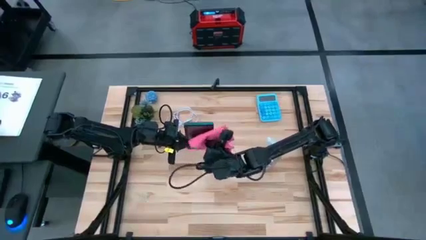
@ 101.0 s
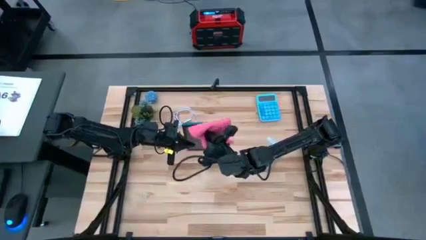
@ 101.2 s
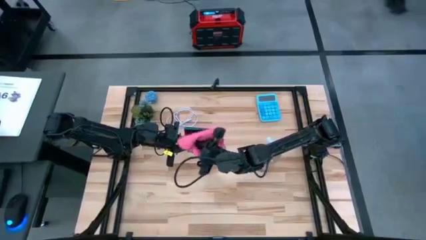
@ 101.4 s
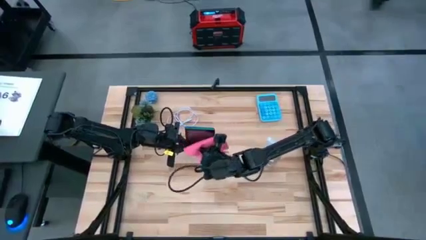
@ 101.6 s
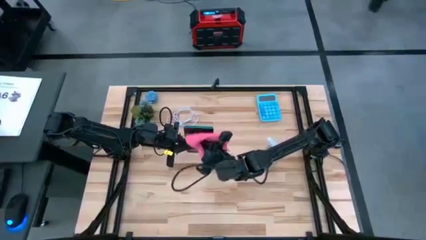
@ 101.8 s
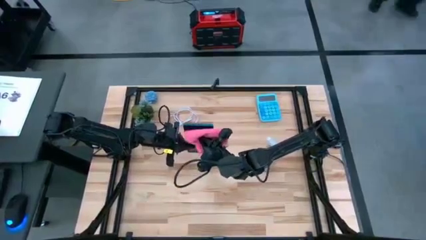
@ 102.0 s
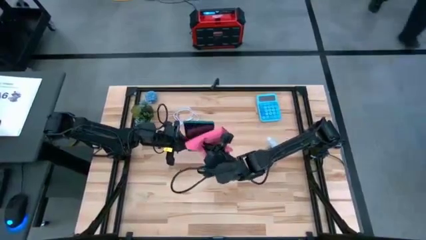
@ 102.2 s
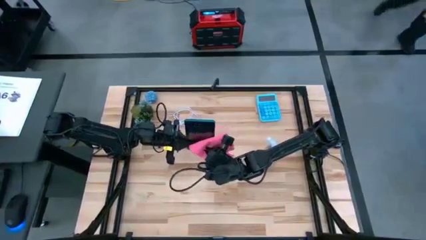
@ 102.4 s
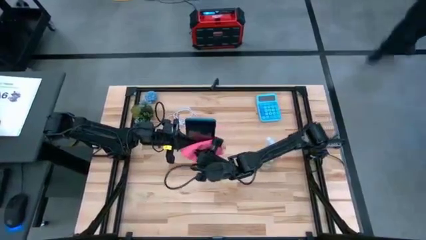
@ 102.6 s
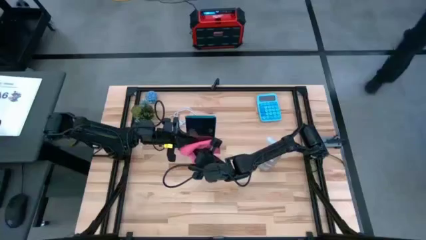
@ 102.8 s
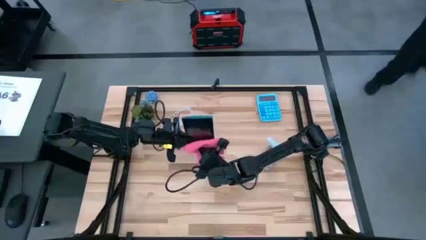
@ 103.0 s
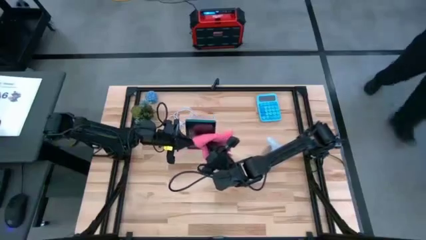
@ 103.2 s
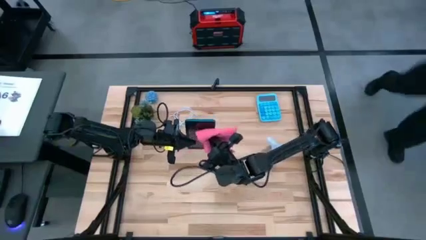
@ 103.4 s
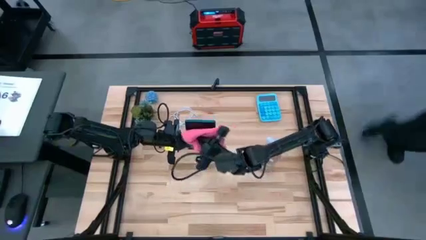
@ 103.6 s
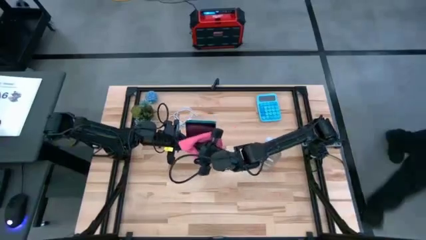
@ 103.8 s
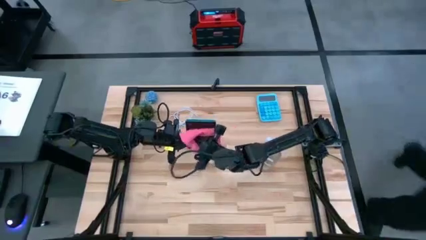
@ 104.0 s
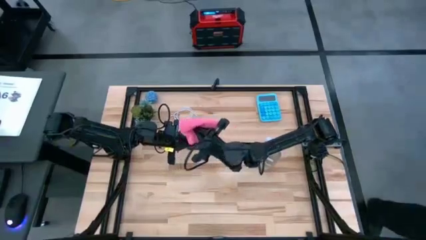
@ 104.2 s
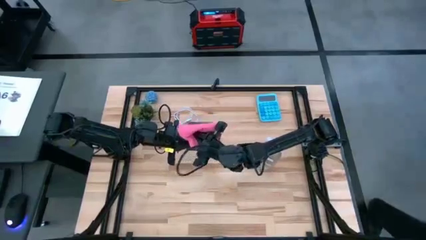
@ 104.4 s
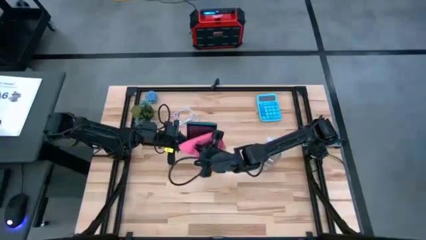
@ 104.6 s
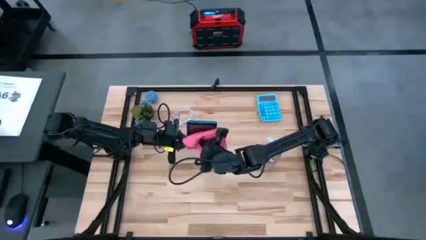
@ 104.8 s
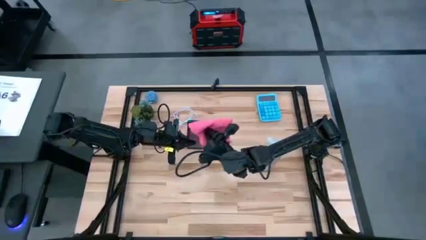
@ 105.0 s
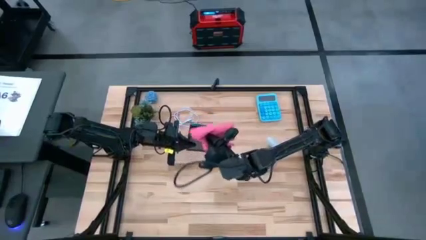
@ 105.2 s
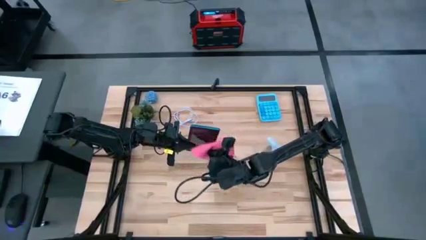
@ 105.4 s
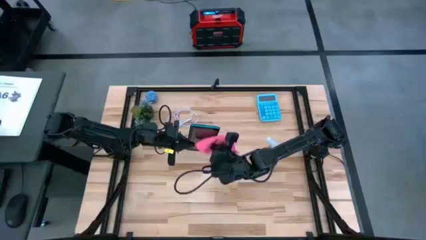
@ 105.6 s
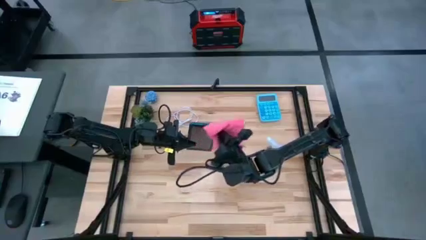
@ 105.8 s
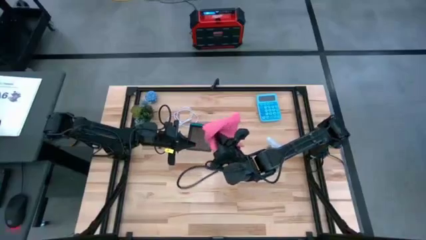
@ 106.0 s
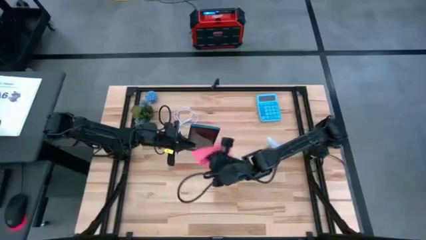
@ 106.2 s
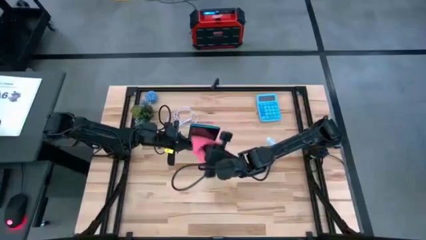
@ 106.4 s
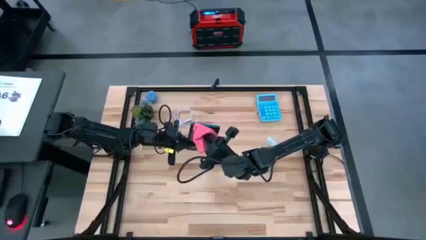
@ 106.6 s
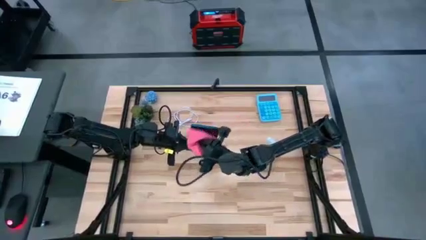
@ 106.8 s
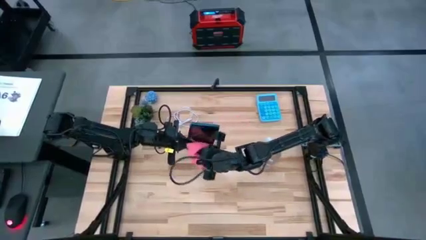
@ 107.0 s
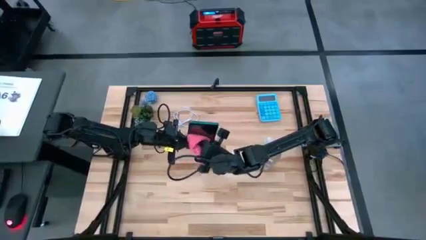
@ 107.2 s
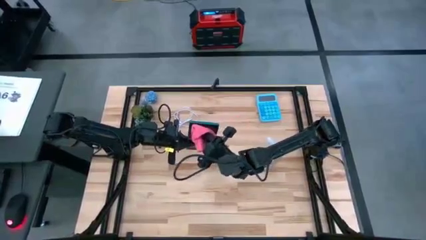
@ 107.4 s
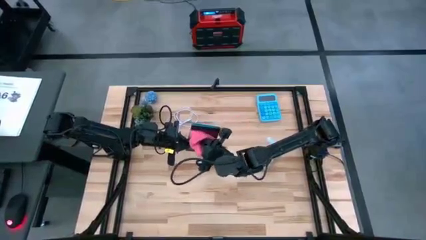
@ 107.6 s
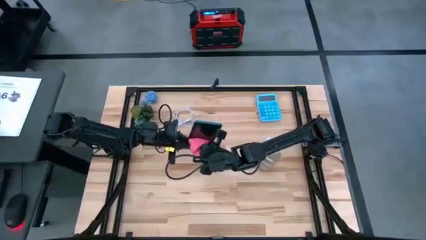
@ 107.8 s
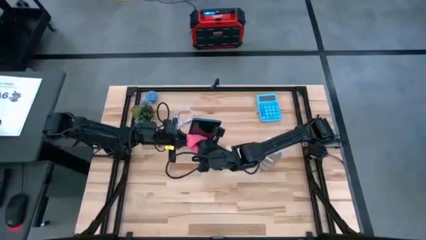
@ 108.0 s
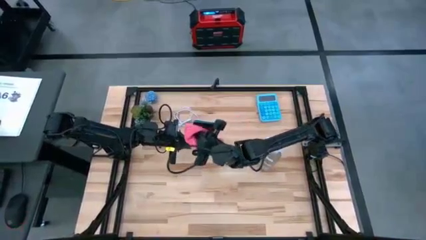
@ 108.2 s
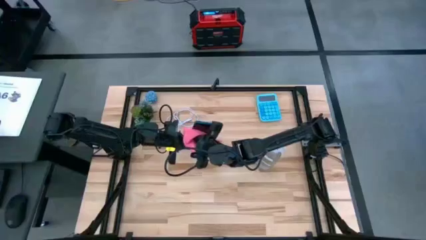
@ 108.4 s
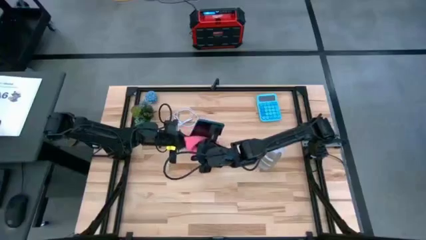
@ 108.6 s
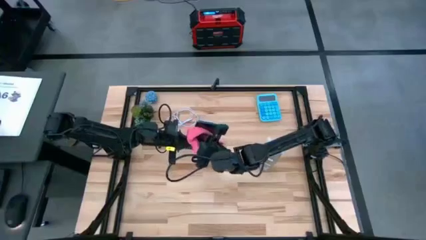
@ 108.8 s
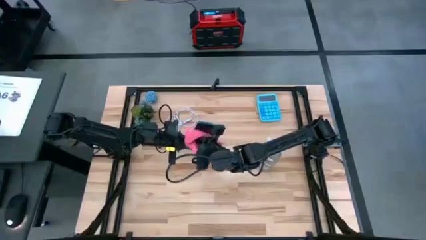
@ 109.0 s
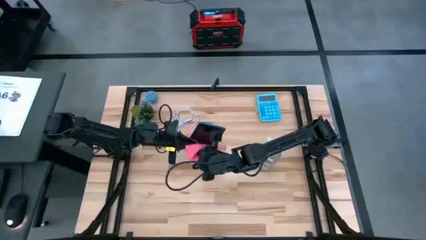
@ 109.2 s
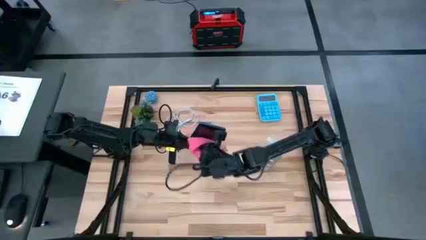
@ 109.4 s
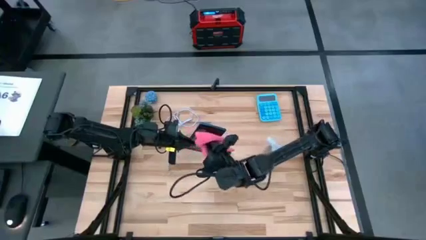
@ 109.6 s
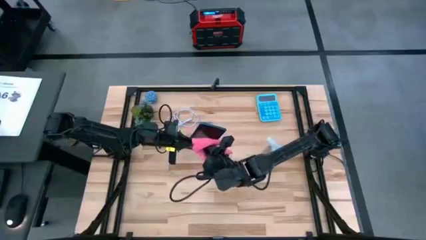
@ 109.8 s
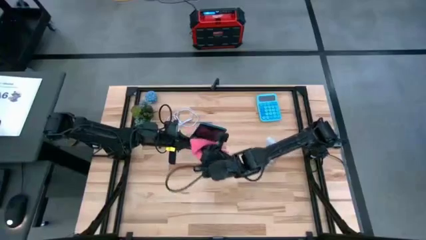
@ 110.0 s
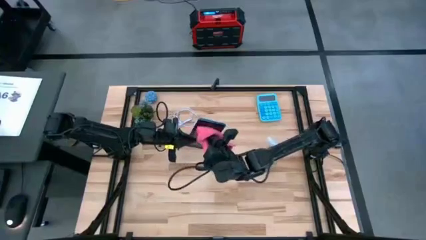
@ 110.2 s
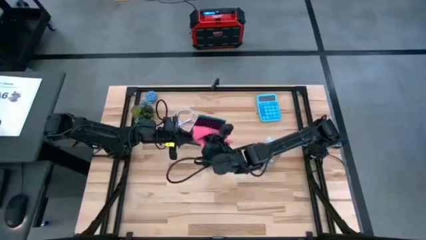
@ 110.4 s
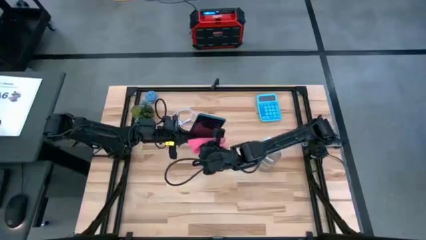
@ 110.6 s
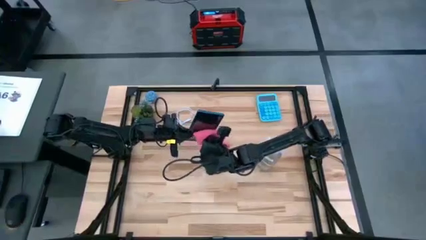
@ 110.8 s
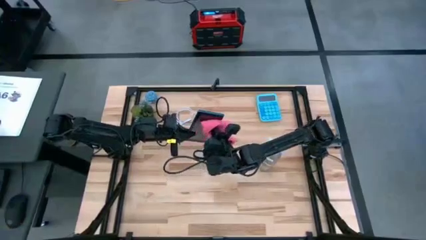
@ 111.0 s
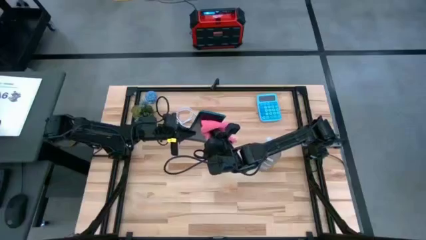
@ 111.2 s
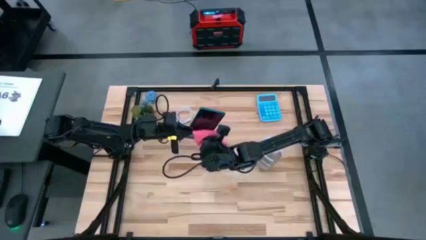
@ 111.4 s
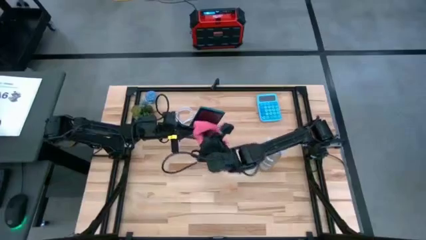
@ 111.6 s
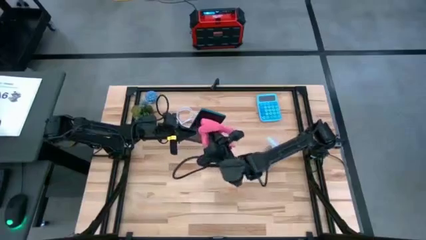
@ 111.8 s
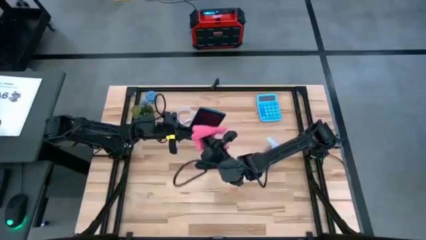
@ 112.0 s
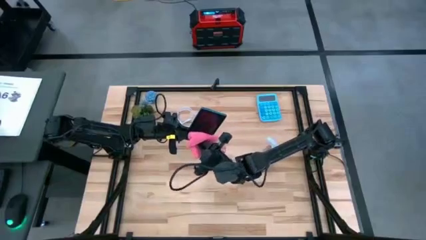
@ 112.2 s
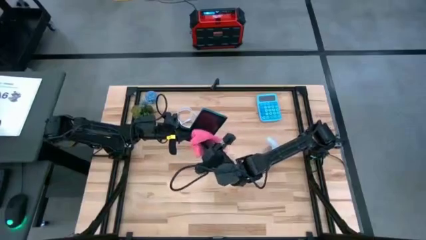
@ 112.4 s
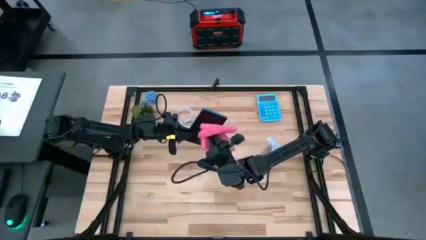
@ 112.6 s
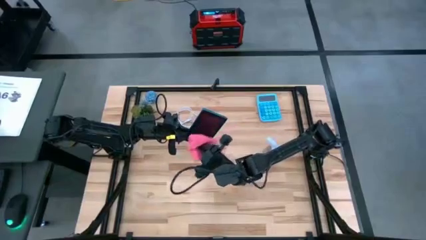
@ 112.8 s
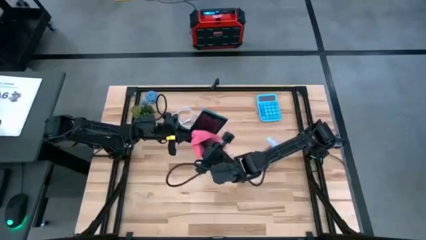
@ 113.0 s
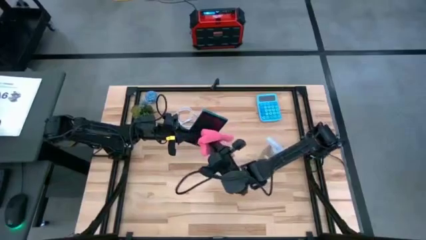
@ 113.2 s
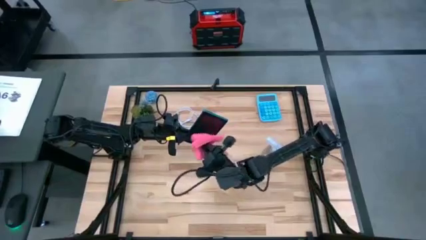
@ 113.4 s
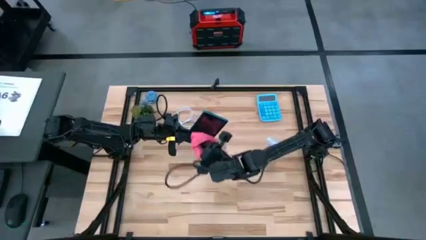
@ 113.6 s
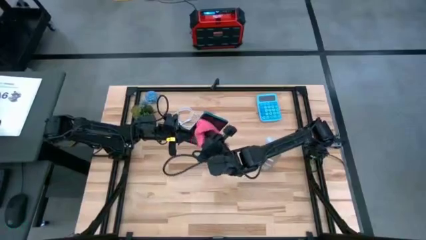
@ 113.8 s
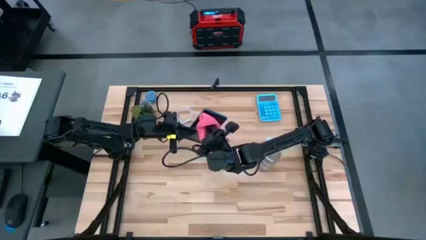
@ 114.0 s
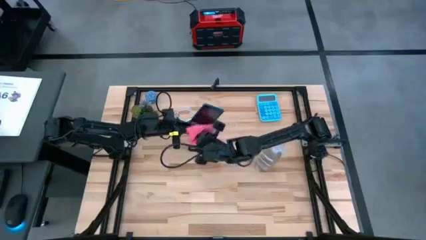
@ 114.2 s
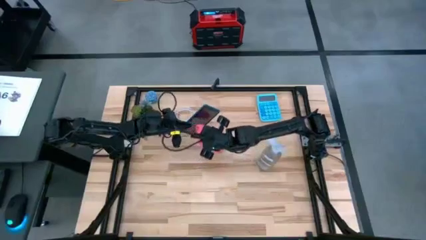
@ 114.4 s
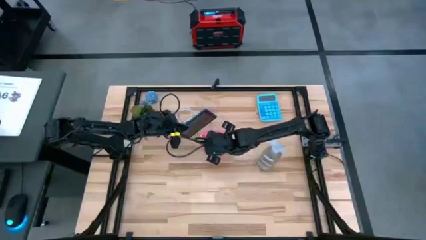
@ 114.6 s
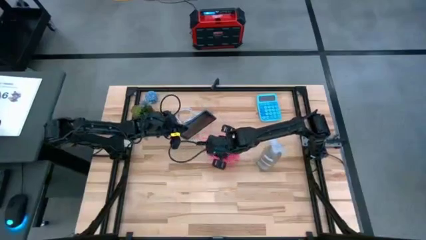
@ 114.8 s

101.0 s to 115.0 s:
Task: Apply microfiber cloth
Wipe the front of the cellphone with the pink microfiber cloth
